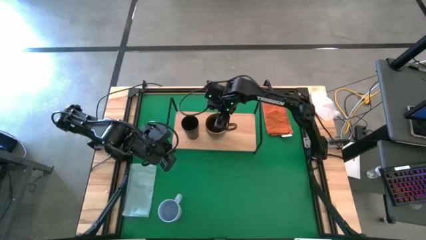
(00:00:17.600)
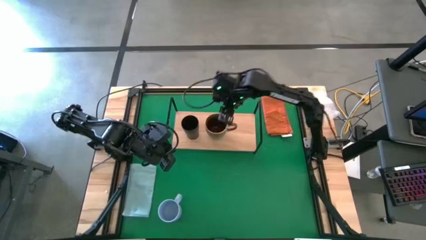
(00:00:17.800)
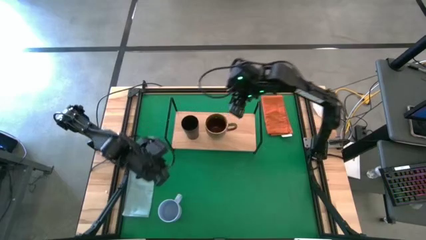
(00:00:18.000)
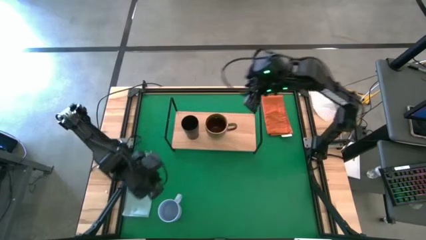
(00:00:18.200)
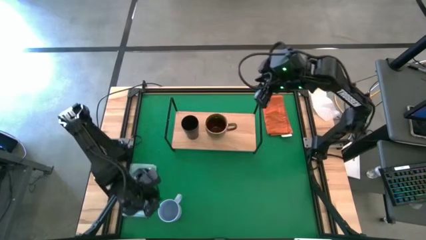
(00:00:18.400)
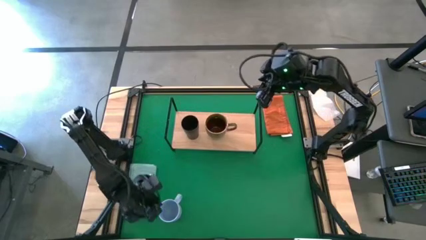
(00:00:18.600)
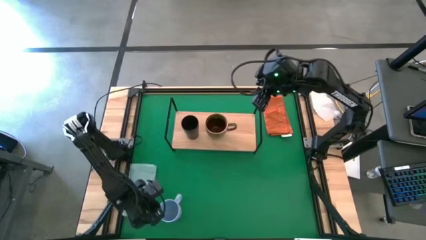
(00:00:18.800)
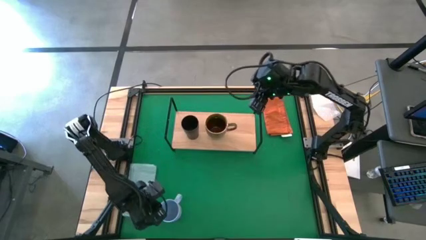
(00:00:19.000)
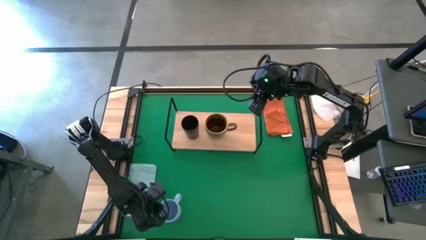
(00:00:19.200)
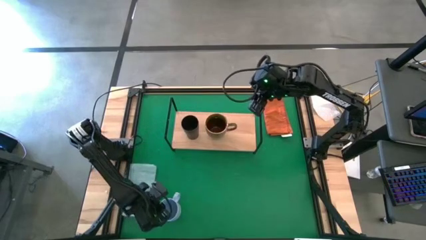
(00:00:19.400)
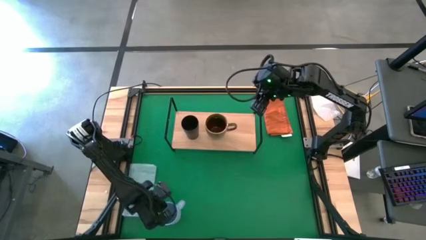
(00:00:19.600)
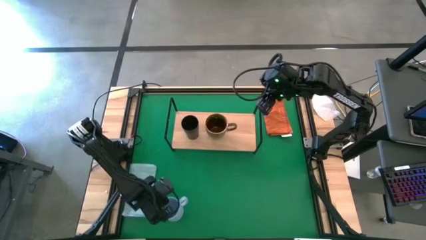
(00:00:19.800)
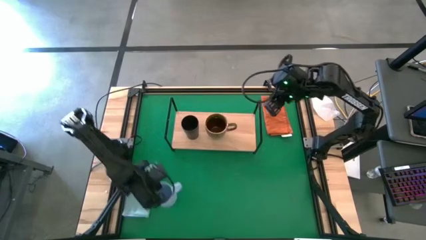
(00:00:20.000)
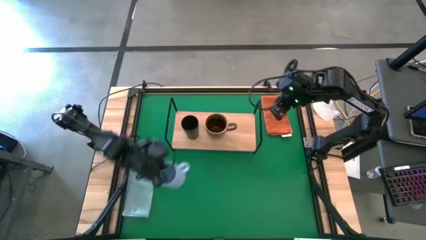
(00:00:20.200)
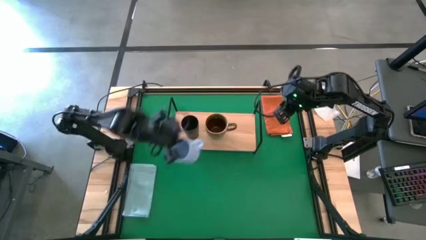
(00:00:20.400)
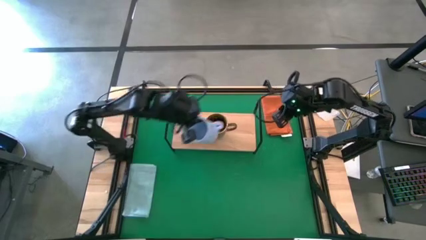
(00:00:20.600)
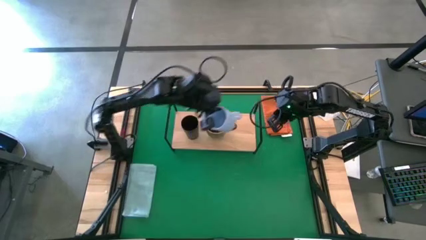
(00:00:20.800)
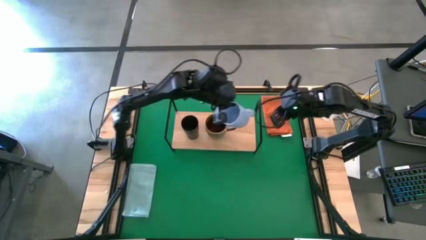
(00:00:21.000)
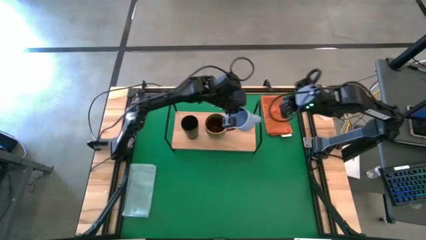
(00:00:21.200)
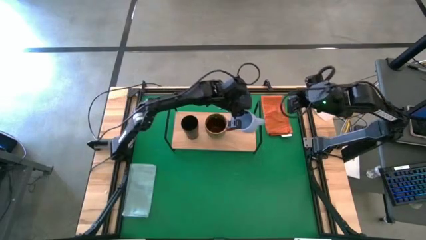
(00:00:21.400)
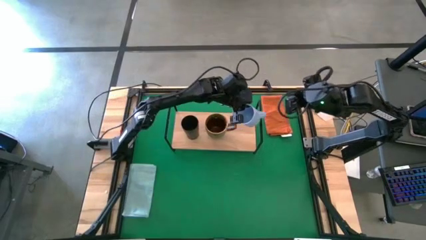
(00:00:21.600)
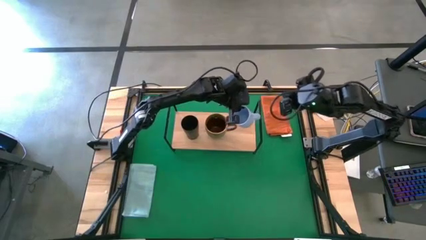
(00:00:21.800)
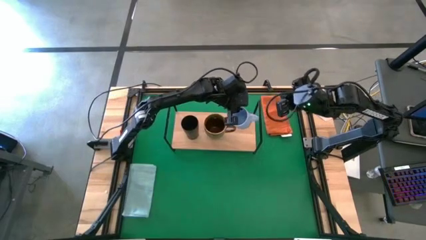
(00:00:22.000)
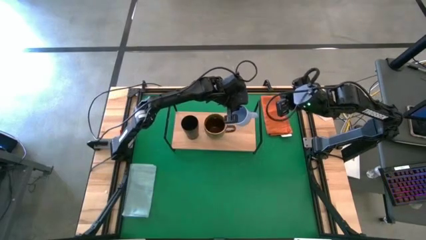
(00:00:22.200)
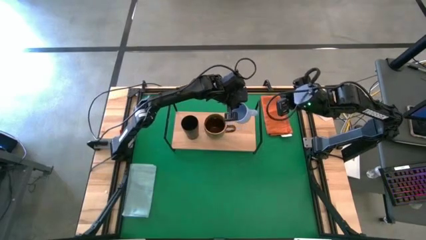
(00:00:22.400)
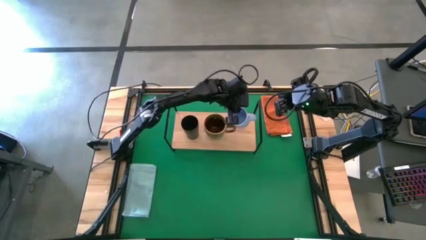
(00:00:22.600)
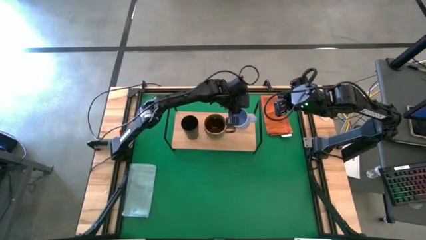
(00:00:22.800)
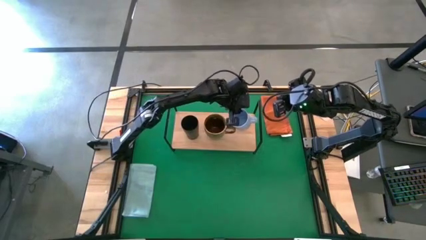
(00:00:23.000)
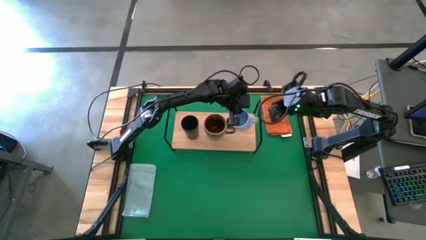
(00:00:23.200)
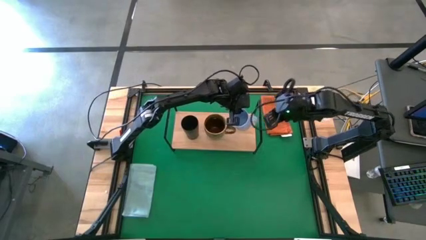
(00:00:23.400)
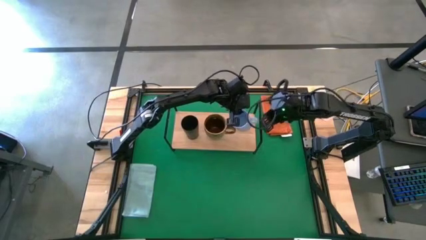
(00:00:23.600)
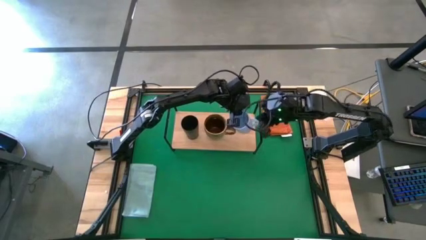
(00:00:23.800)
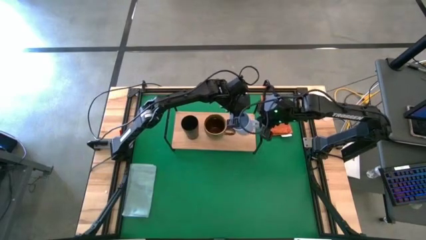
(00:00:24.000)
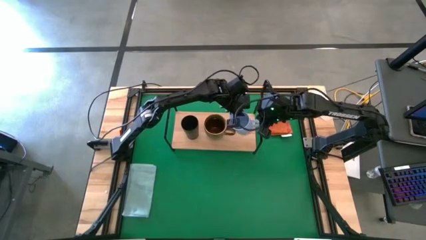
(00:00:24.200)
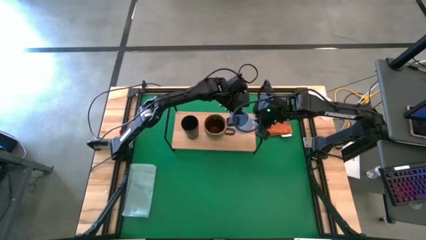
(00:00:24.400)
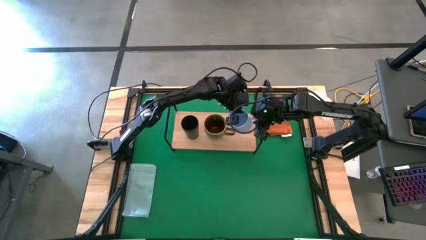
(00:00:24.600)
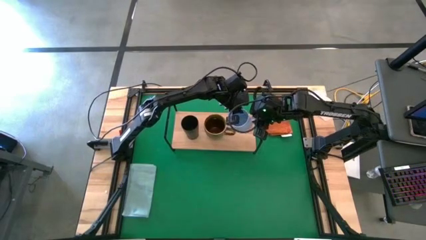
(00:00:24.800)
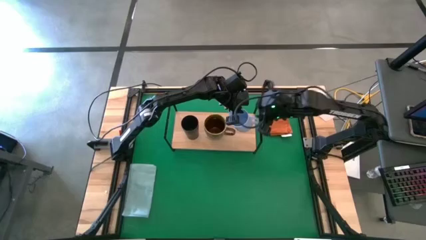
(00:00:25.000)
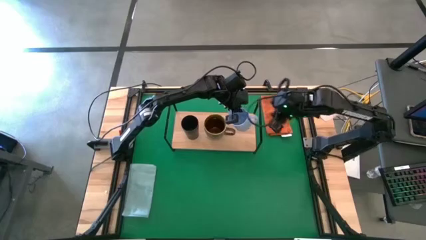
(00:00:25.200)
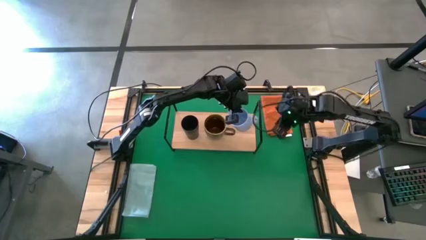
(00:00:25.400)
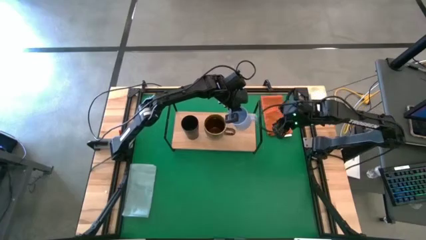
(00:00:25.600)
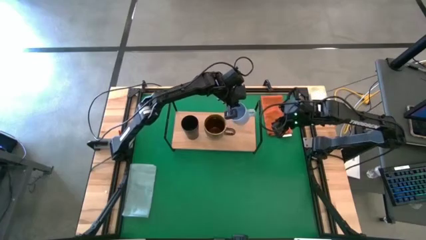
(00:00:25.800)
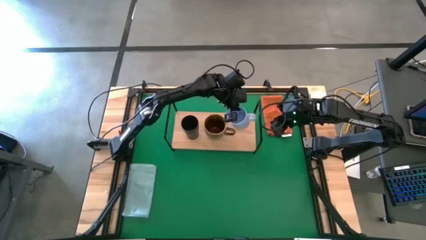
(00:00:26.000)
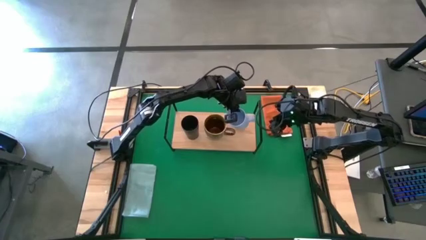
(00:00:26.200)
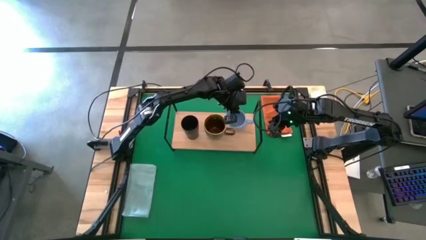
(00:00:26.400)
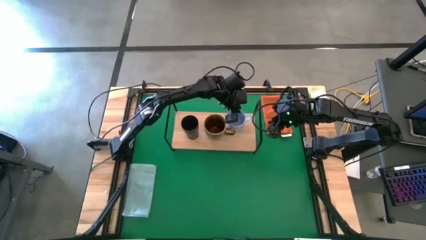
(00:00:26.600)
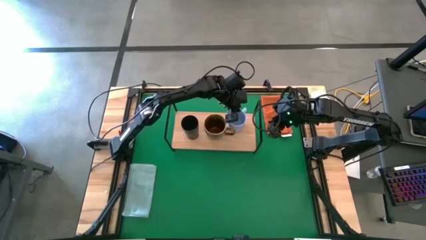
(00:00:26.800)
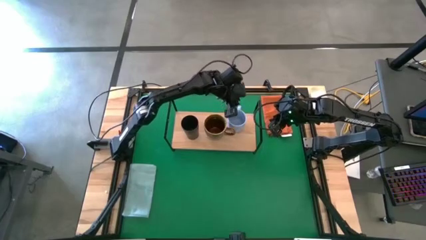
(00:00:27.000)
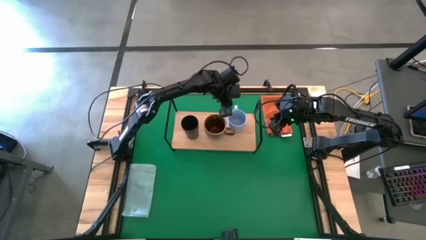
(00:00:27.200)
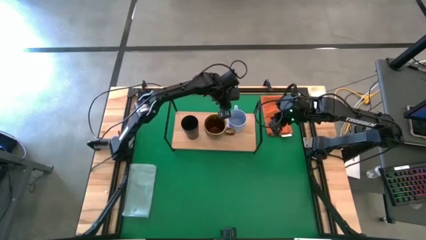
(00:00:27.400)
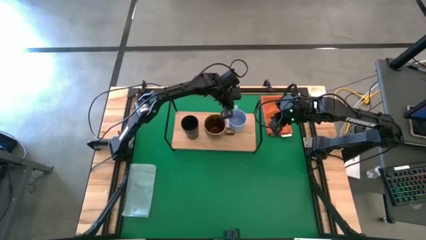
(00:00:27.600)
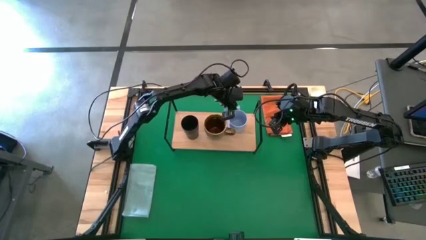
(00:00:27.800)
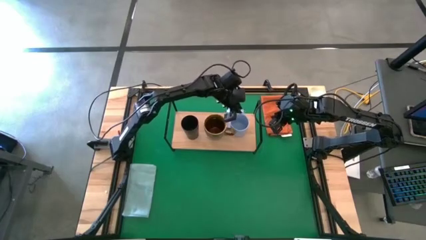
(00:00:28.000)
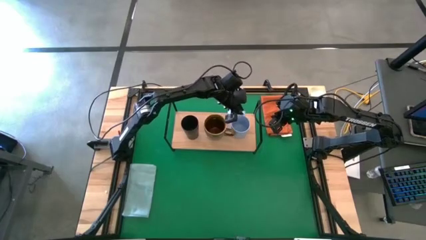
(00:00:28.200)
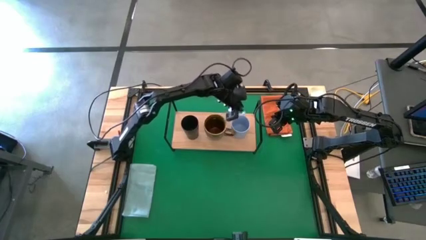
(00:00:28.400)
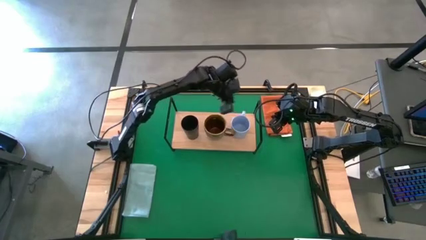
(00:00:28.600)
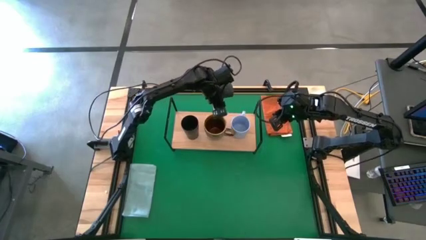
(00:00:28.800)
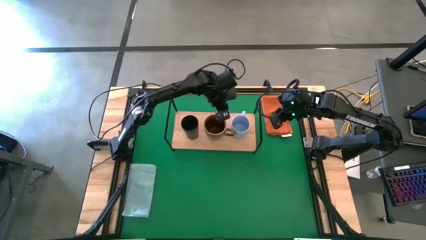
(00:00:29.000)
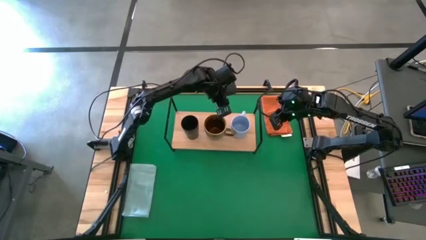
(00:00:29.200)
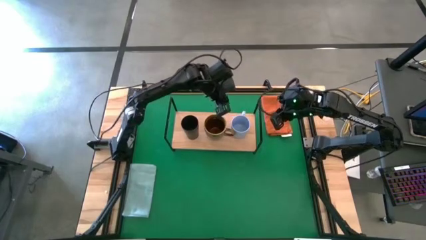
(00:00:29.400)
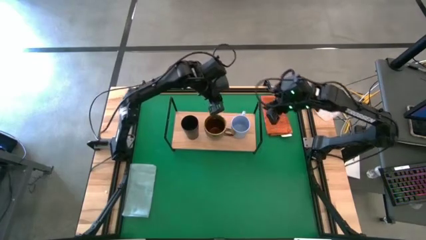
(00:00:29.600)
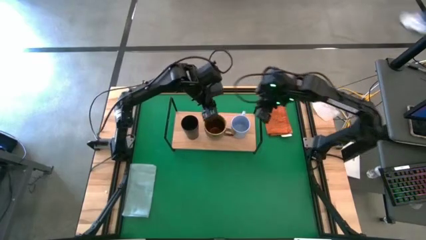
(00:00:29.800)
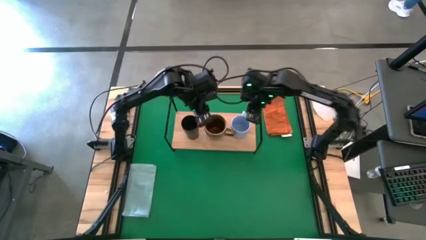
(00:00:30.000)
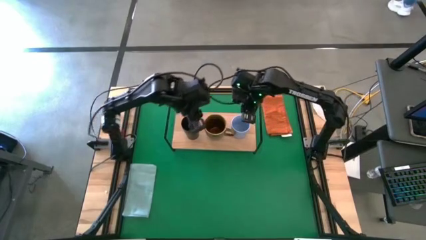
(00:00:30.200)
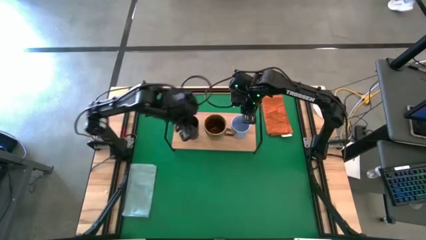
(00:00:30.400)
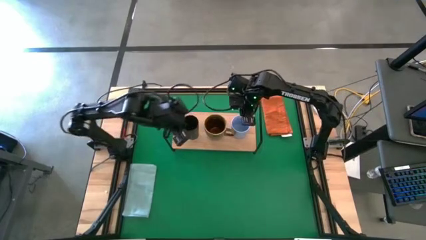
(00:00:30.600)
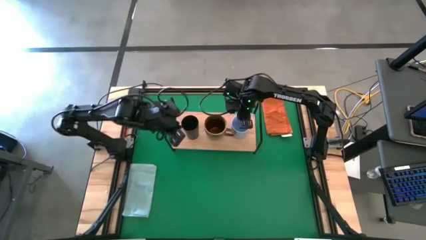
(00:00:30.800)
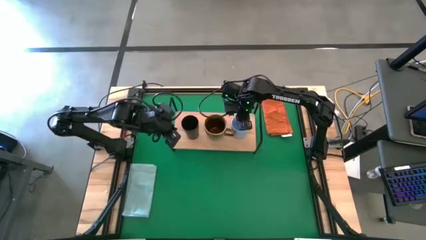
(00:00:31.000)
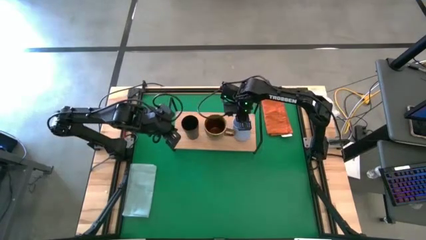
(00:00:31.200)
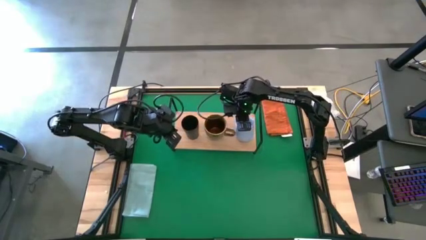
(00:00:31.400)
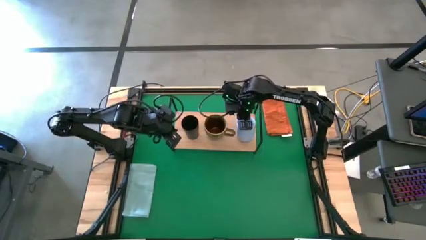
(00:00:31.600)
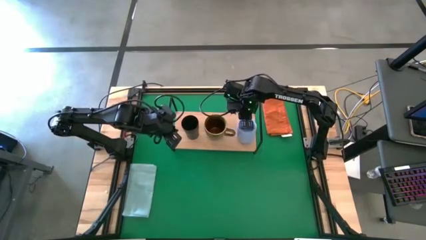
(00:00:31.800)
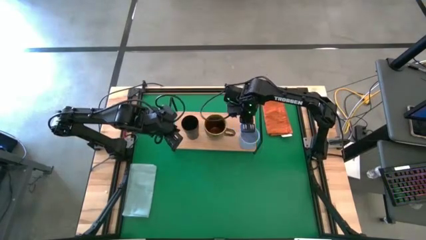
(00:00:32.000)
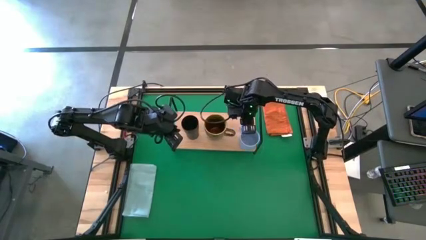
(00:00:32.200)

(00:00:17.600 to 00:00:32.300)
Task: Stack small to large cups/mugs on shelf
Put the light blue mug on the shelf

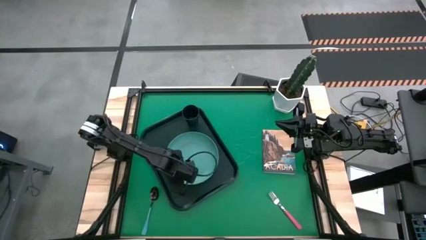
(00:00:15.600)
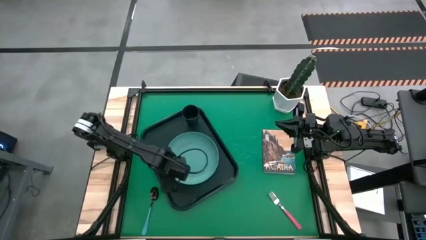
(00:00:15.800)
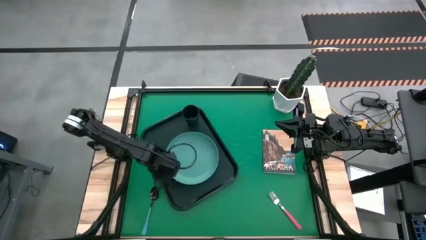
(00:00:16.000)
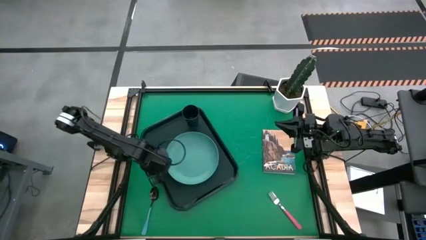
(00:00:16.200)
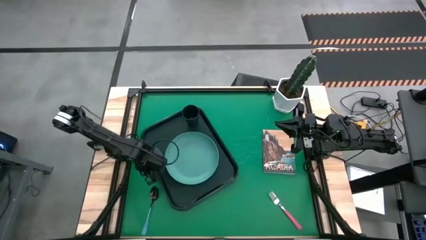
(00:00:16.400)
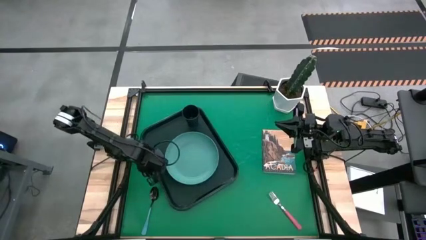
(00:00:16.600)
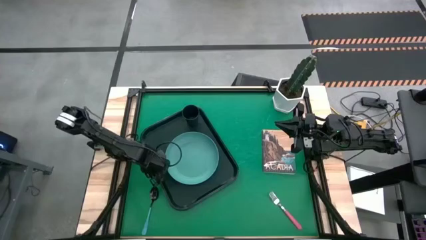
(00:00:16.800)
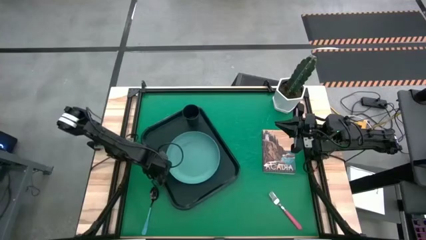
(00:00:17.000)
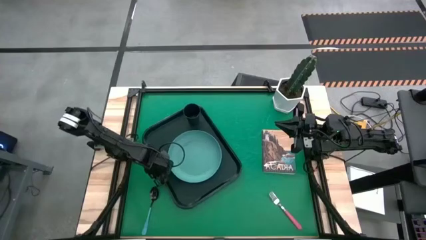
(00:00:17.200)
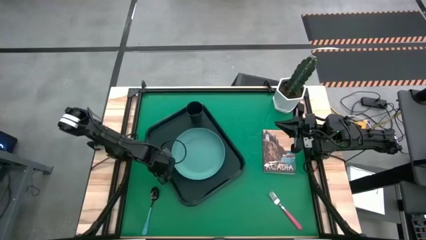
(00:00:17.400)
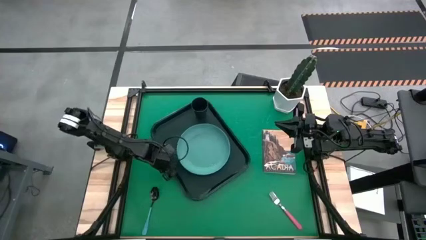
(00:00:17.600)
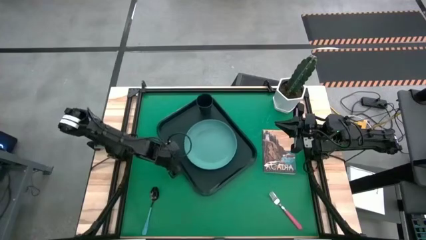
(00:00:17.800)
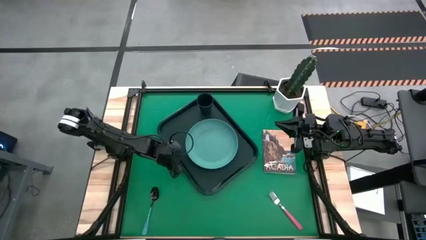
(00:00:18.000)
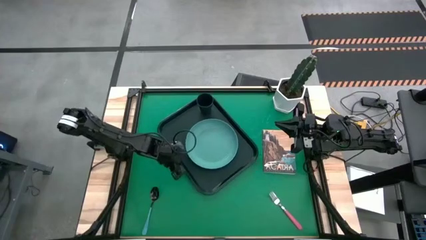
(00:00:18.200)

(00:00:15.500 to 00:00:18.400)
Task: Pick and place plate/cup/fork/spoon on tray
Adjust the black tray to the center of the table
